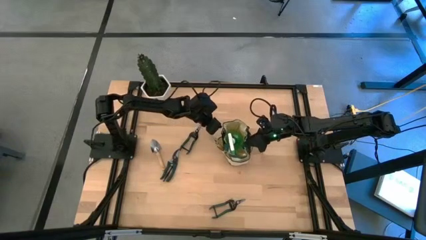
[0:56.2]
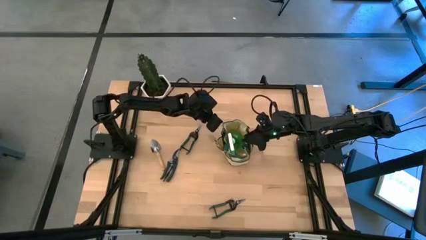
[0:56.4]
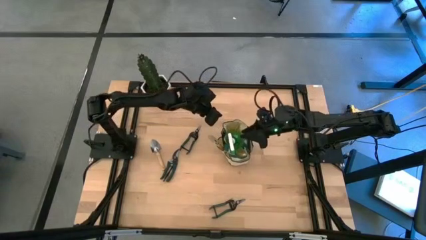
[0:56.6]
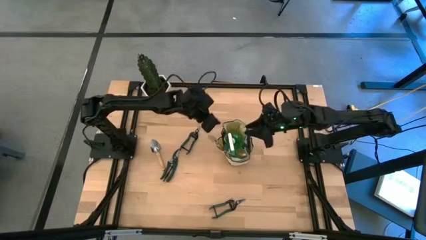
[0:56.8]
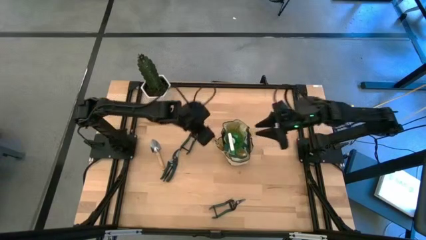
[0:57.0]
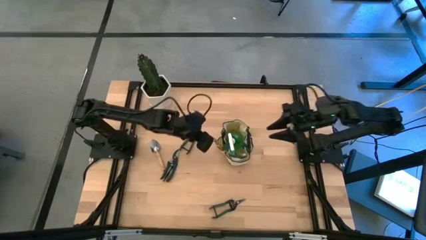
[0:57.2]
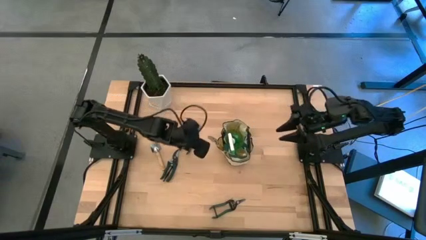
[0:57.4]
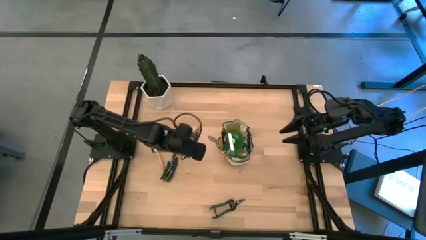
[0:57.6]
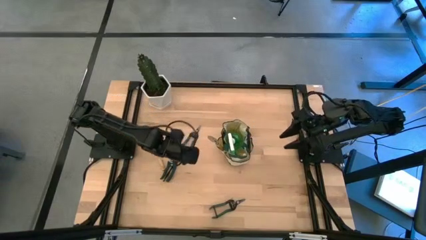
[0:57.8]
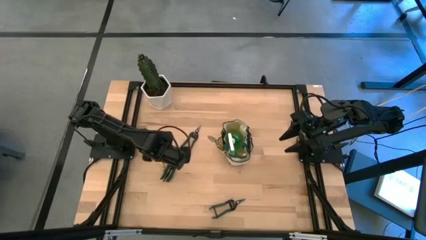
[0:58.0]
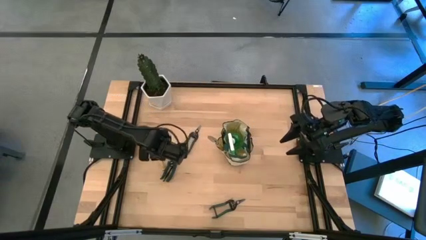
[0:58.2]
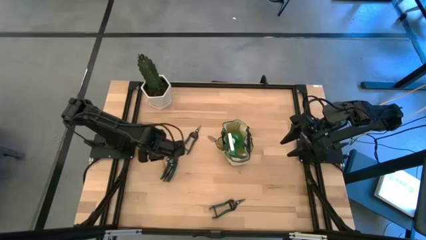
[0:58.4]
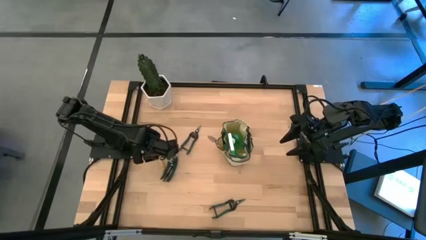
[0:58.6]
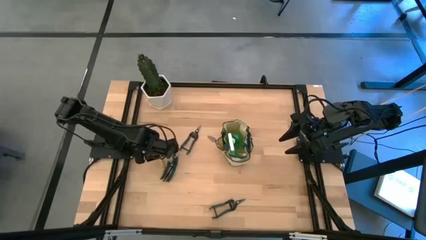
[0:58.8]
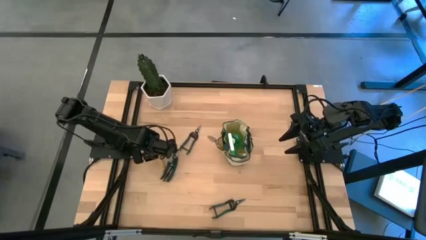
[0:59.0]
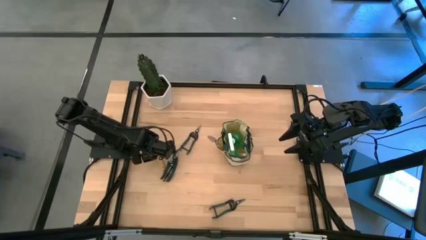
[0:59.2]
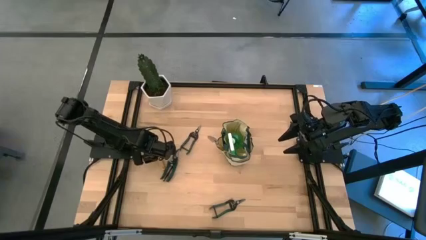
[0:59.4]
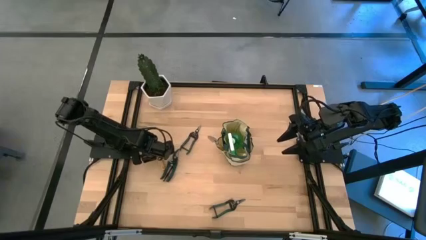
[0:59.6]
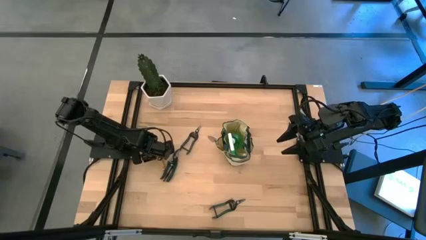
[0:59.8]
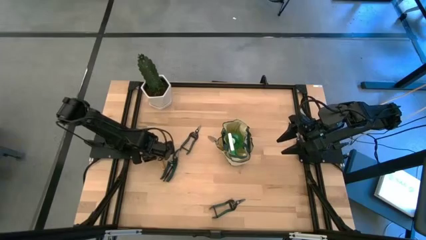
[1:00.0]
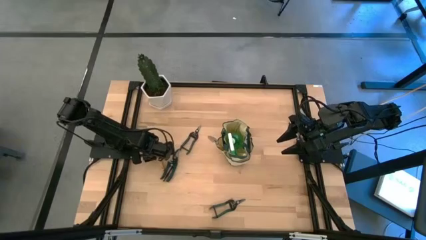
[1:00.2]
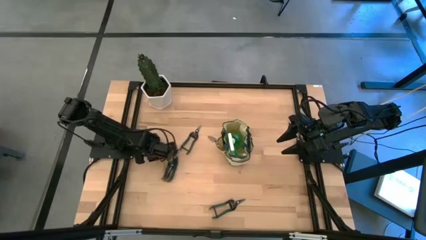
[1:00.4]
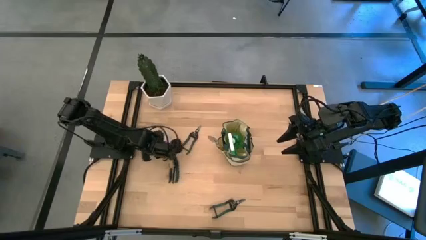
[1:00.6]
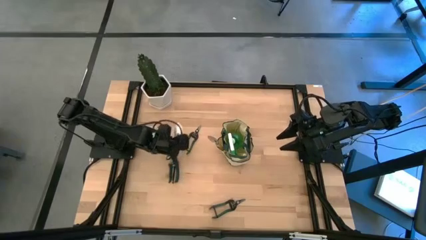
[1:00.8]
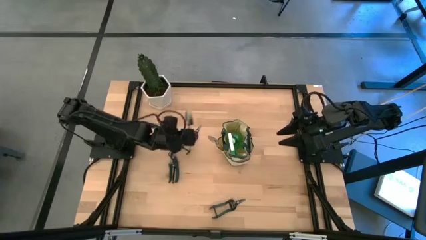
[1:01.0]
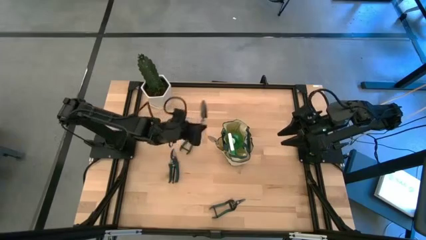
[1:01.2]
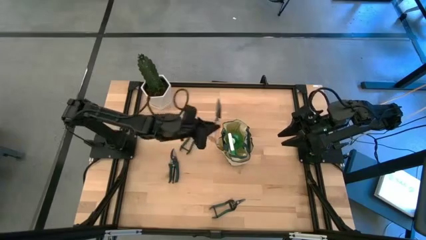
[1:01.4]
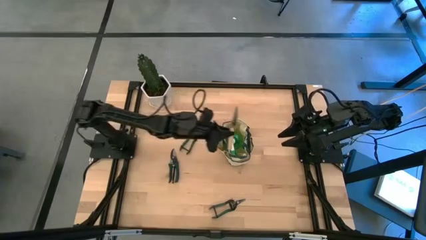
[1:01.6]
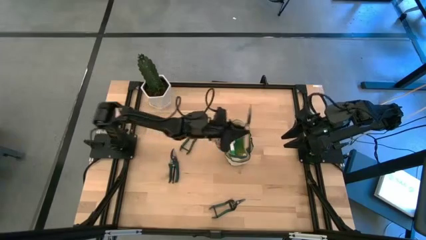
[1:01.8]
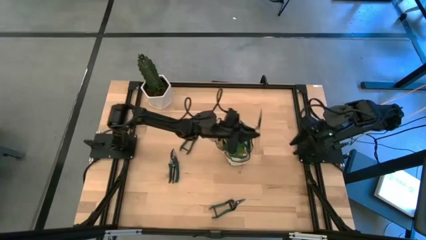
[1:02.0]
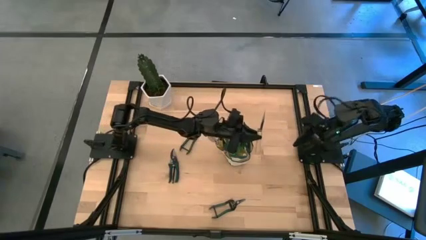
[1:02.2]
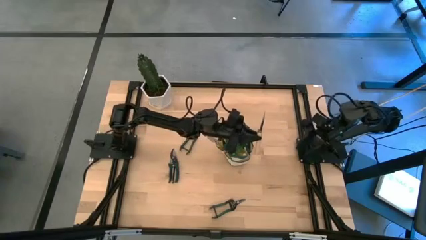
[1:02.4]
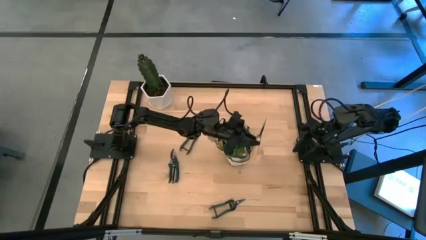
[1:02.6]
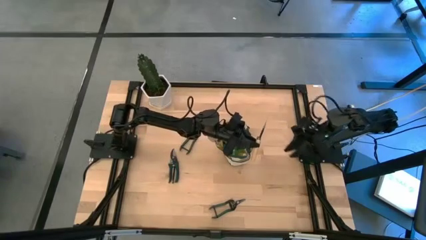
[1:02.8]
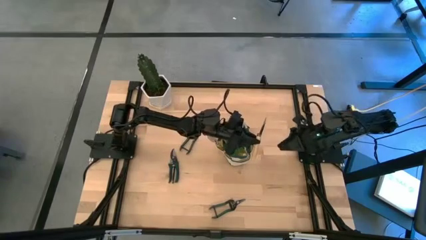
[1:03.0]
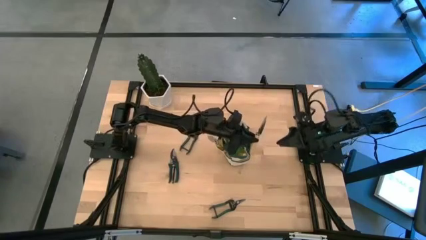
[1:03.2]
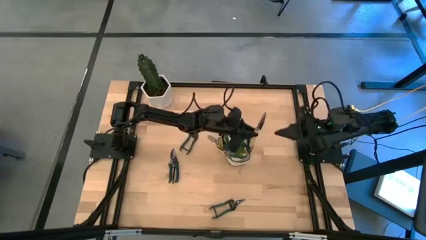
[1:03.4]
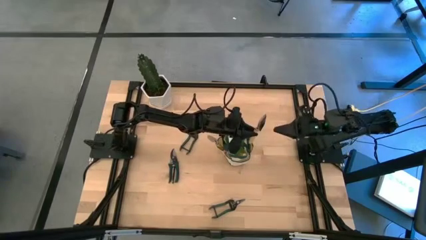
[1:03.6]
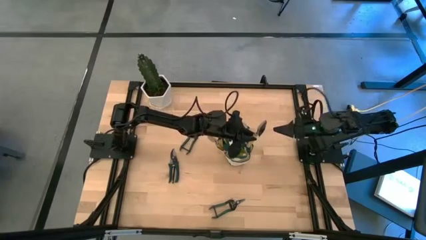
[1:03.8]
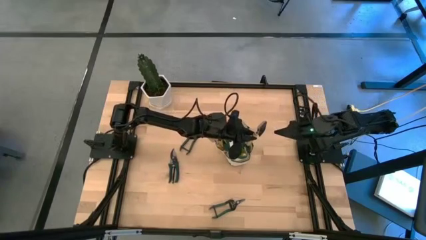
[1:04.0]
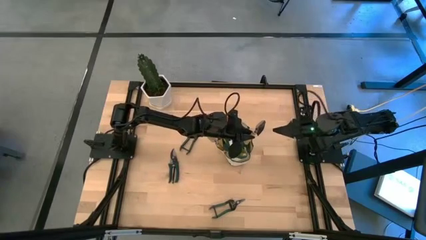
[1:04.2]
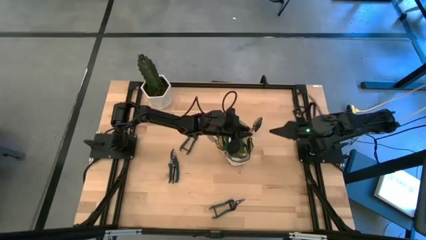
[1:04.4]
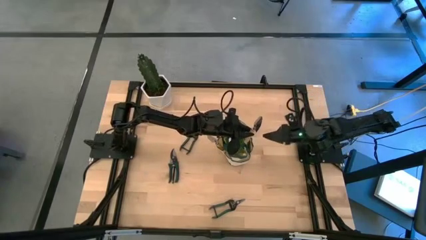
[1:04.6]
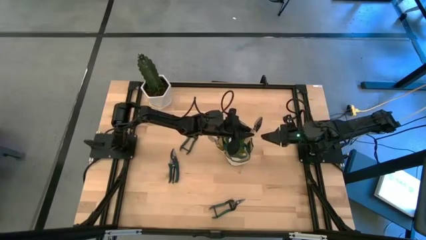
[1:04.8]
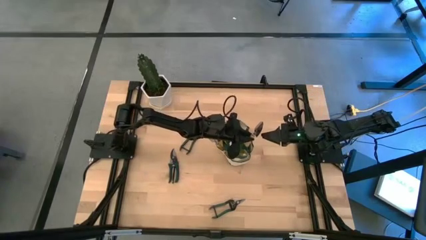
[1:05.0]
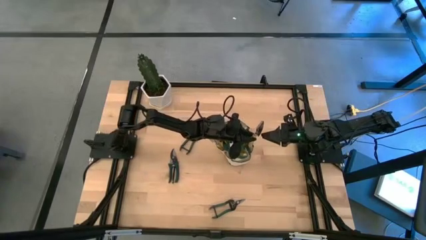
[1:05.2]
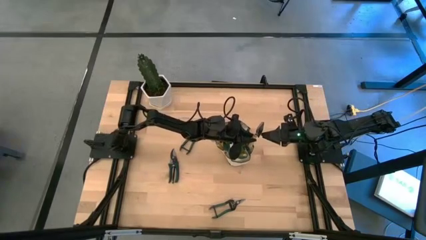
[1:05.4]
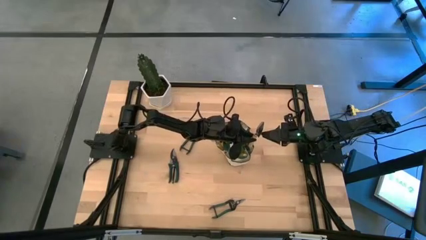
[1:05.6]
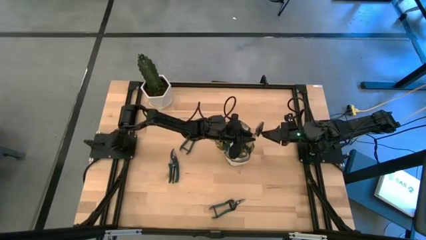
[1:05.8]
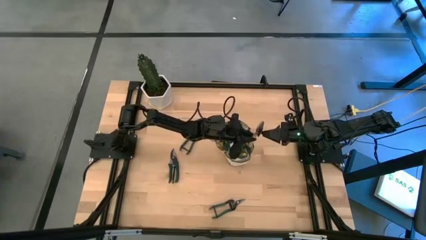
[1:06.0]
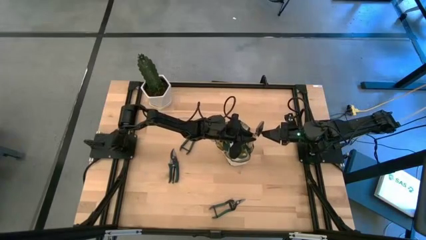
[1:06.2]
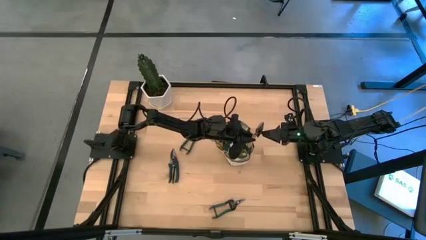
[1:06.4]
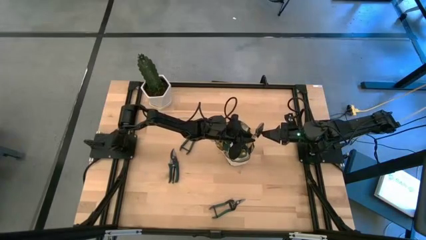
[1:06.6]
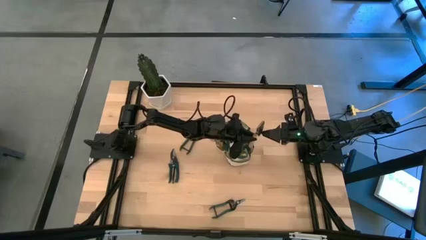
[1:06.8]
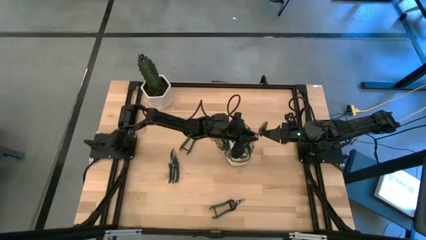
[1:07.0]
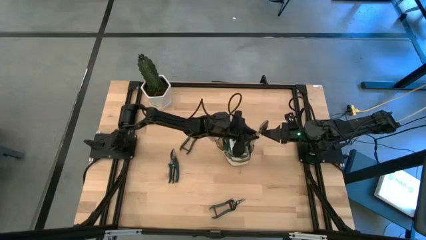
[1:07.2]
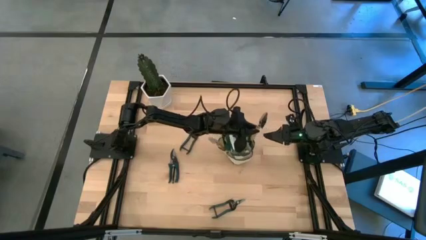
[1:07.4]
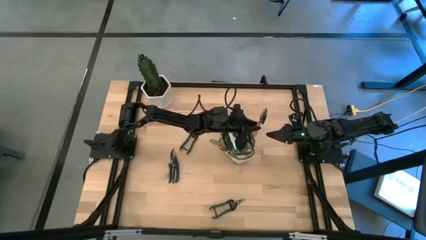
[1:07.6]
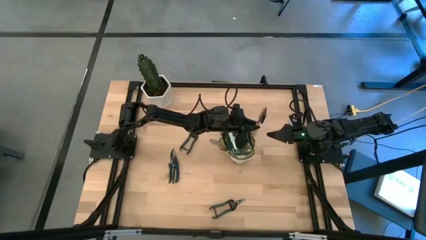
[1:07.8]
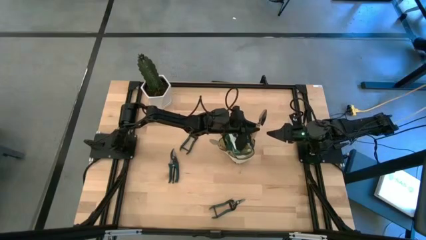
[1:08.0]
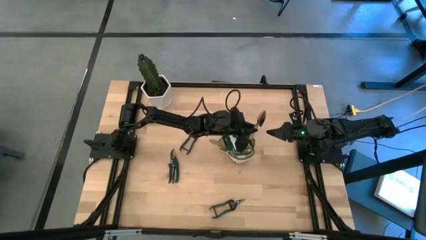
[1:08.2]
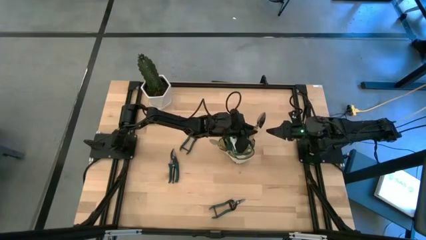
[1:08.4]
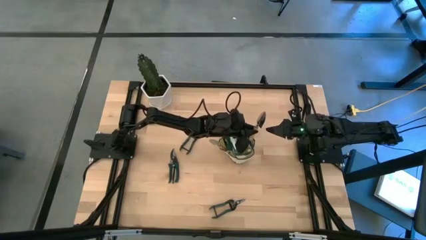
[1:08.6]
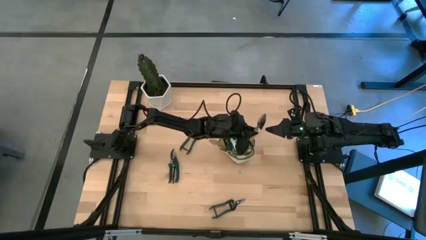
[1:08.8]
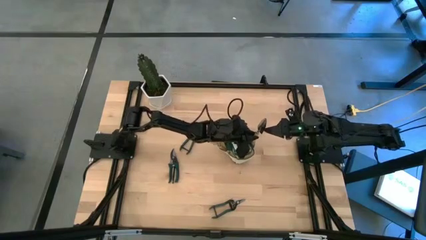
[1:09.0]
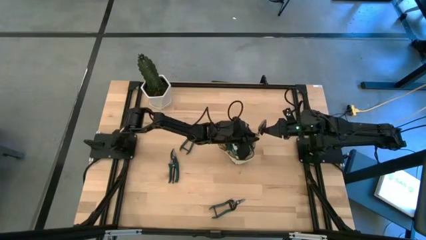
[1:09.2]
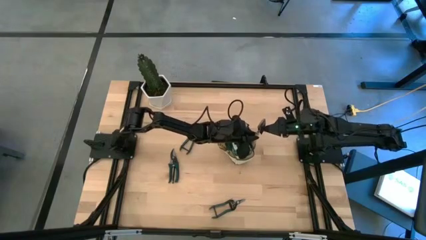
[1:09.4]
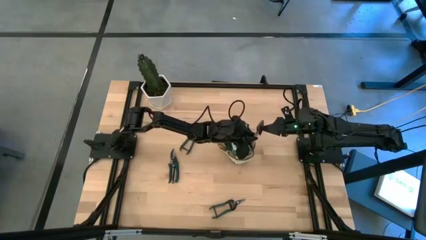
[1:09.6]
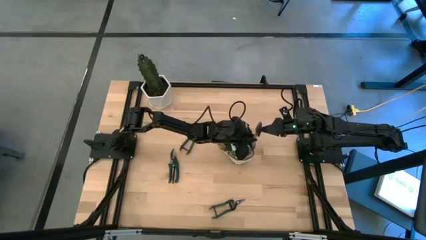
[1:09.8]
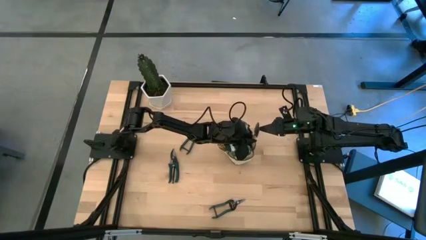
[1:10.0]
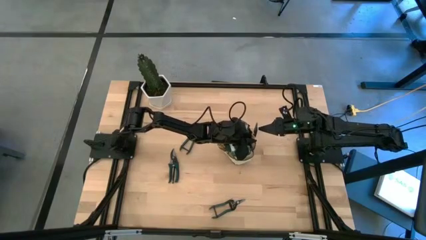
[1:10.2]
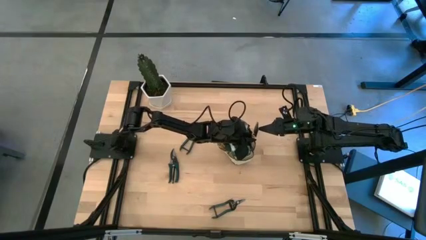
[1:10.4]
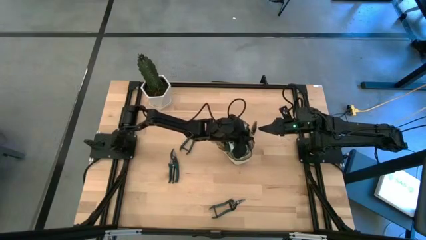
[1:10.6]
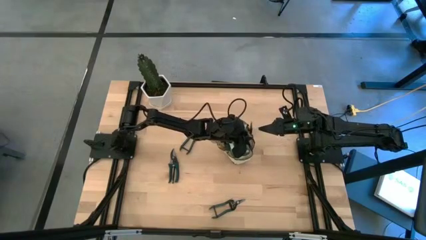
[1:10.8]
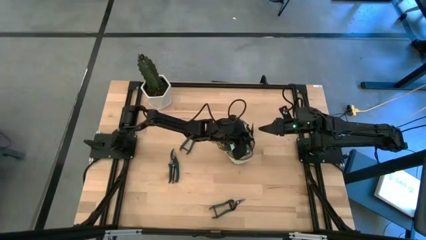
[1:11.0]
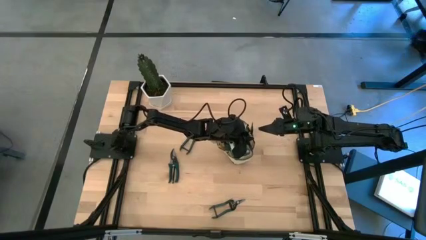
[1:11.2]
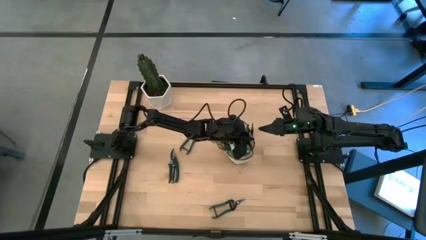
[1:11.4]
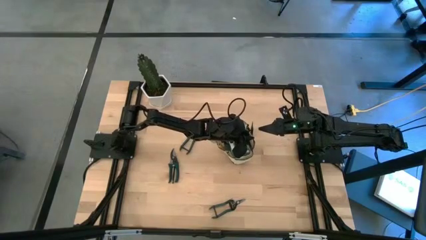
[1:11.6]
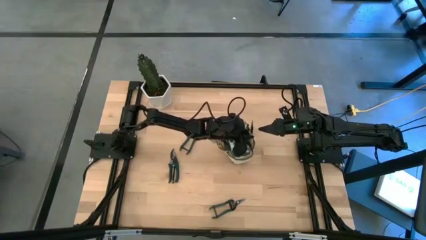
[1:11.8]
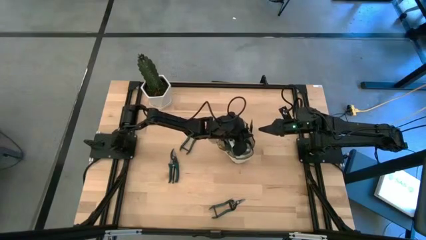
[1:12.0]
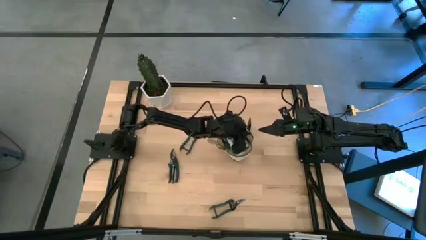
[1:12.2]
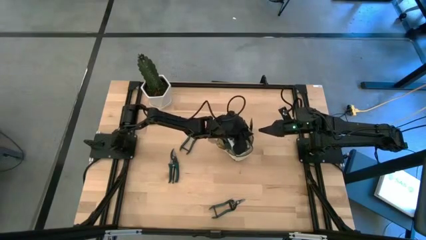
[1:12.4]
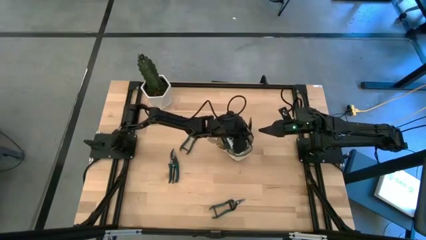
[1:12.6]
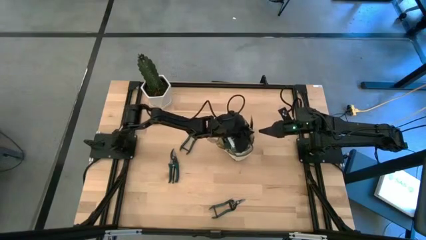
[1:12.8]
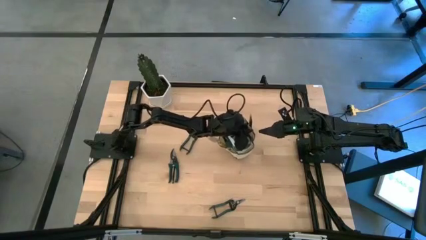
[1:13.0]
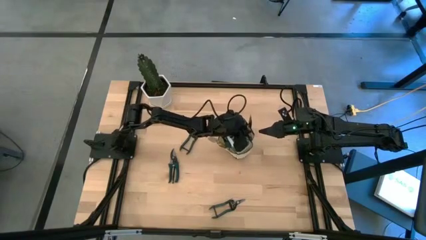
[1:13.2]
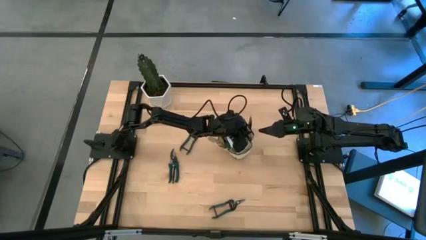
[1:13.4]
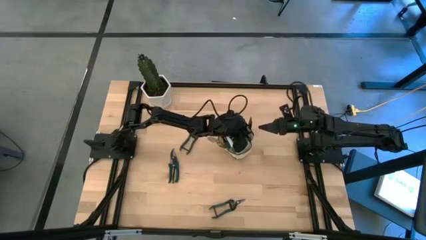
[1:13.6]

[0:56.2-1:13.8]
Task: Pick & Place Garden tools in Gardening bag
Put the trowel into the gardening bag
